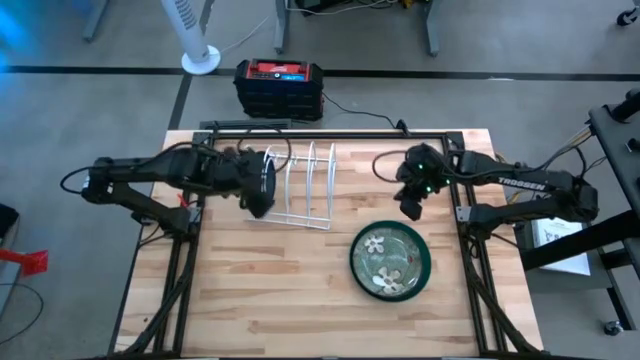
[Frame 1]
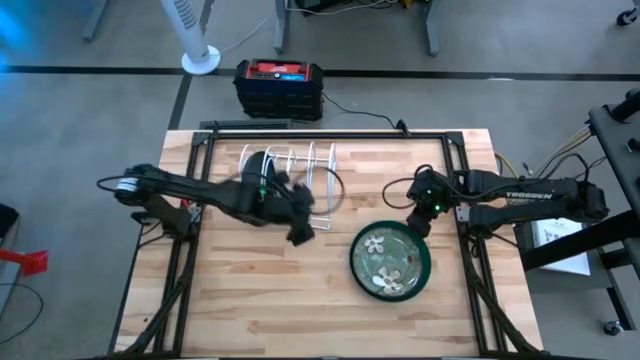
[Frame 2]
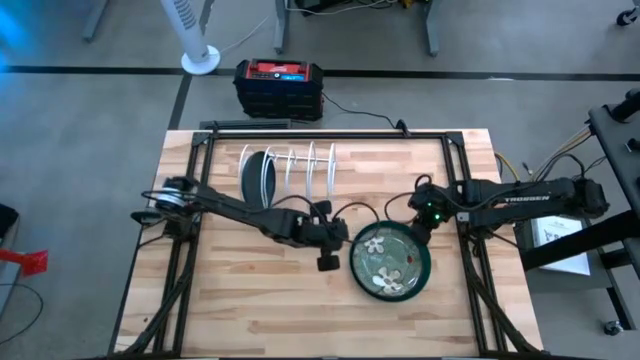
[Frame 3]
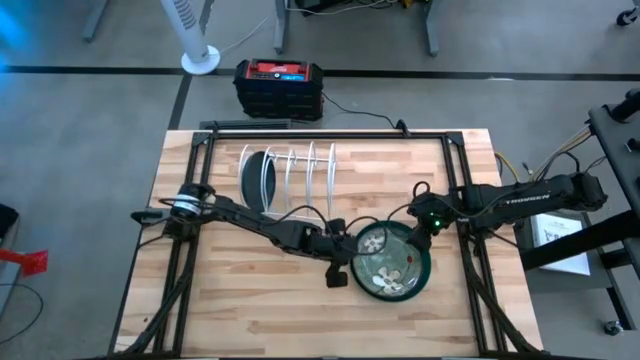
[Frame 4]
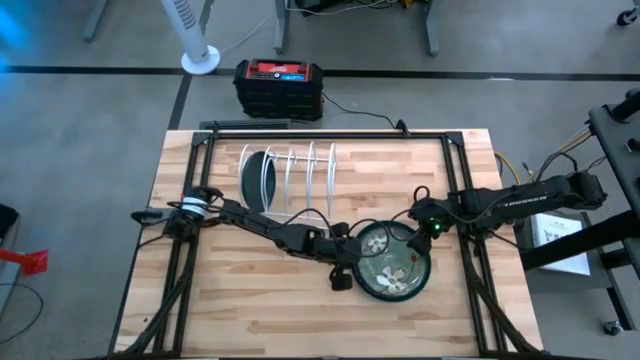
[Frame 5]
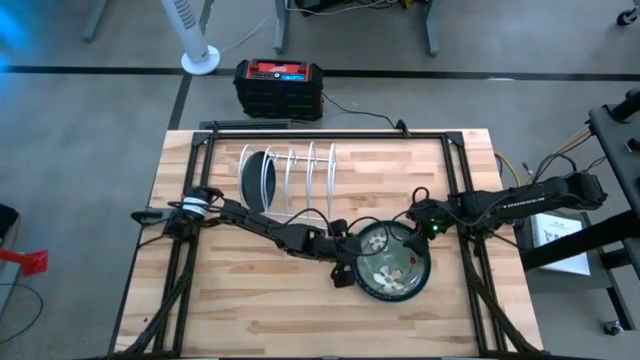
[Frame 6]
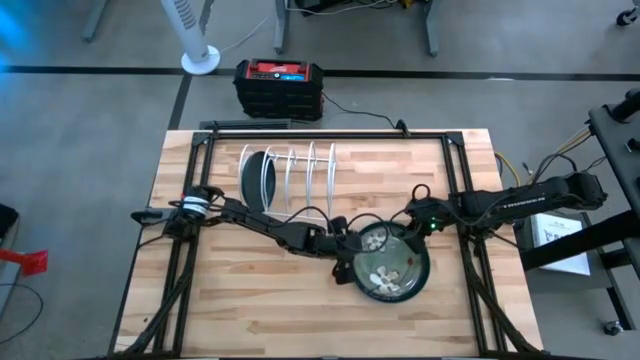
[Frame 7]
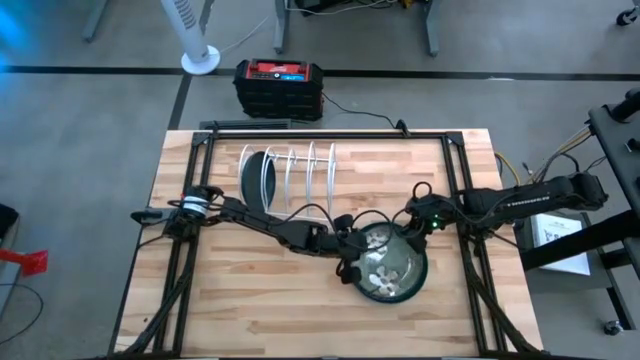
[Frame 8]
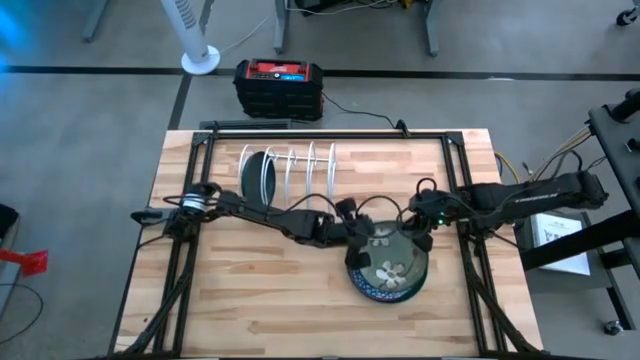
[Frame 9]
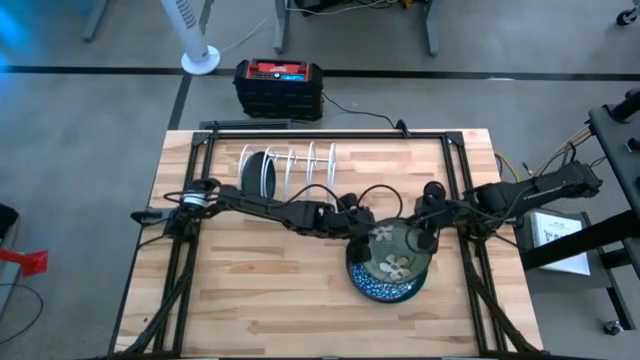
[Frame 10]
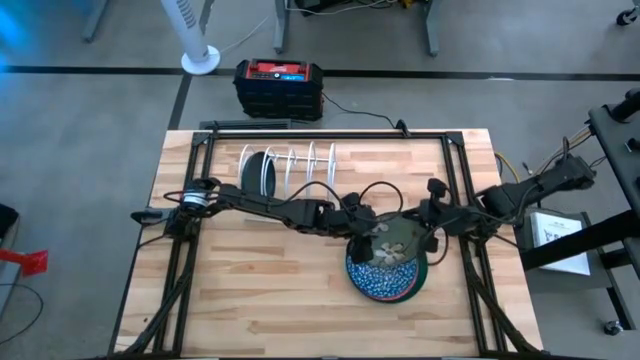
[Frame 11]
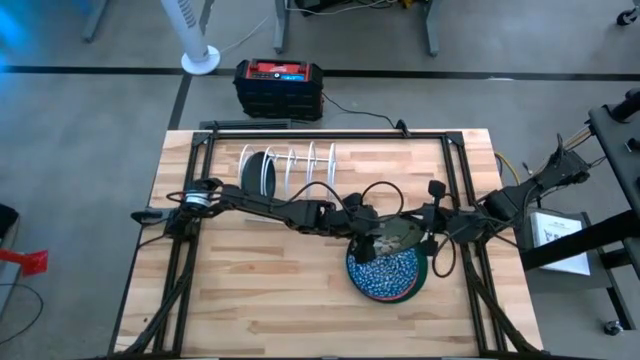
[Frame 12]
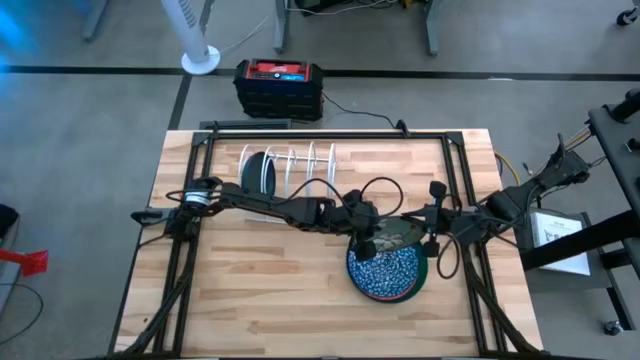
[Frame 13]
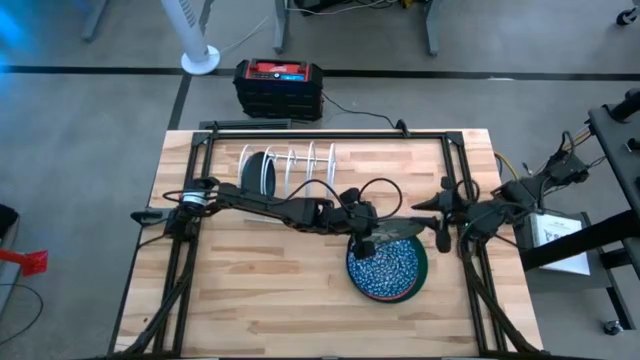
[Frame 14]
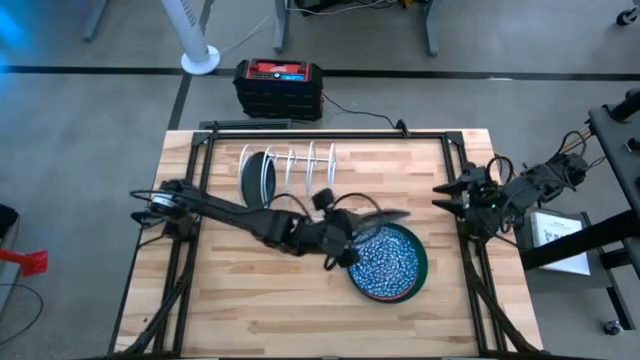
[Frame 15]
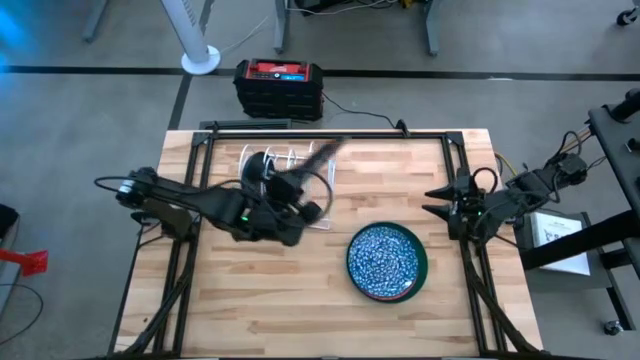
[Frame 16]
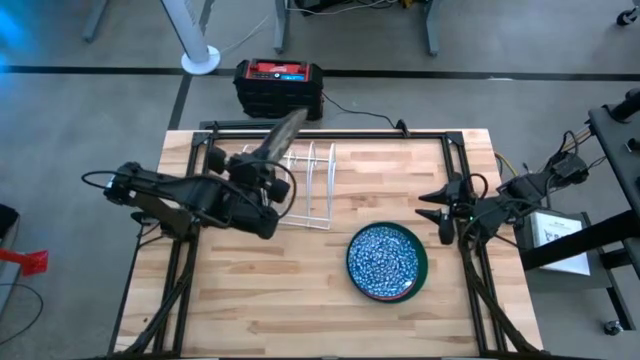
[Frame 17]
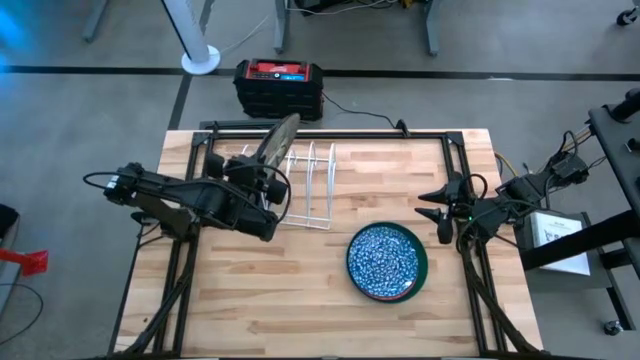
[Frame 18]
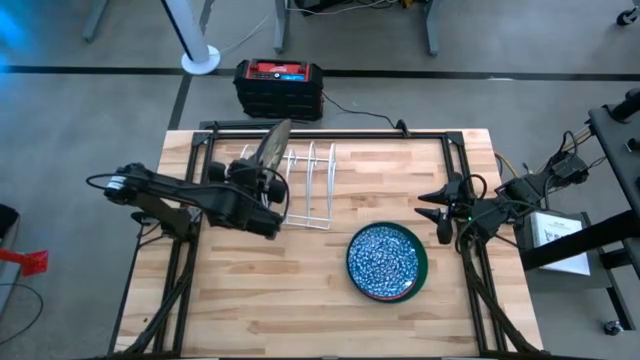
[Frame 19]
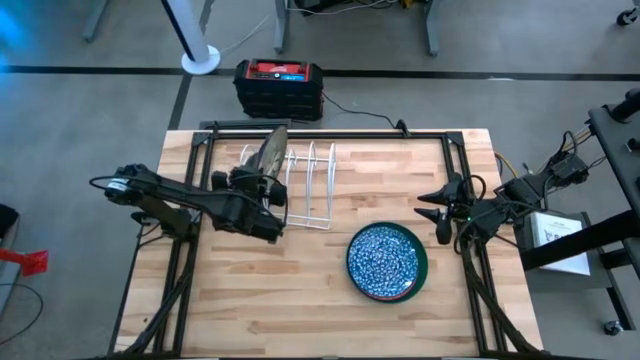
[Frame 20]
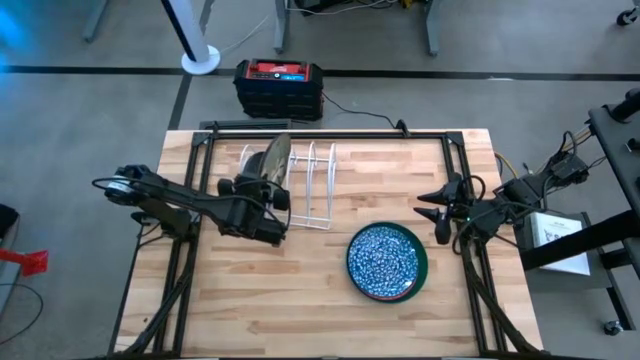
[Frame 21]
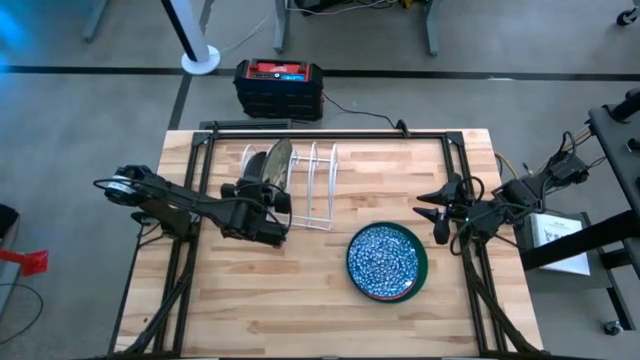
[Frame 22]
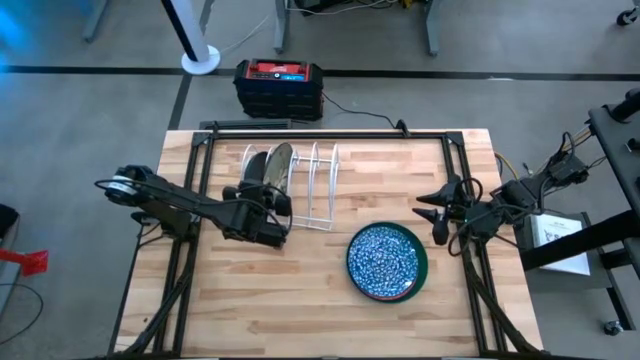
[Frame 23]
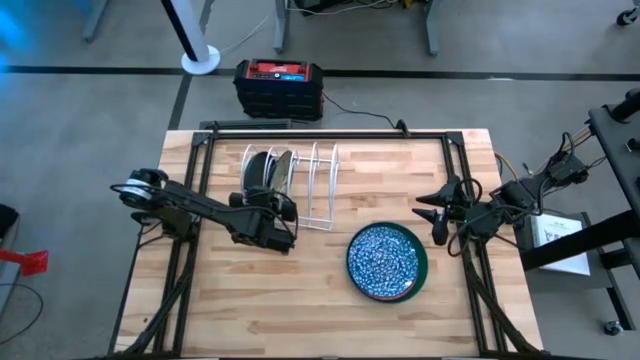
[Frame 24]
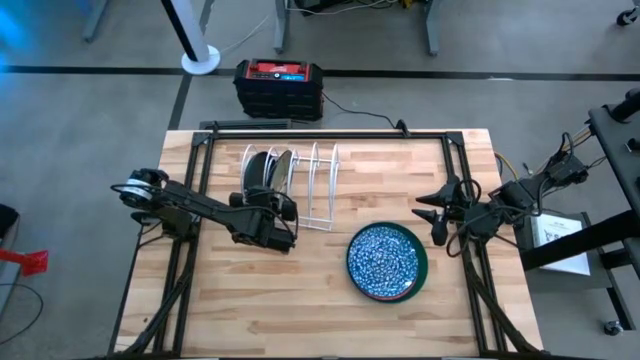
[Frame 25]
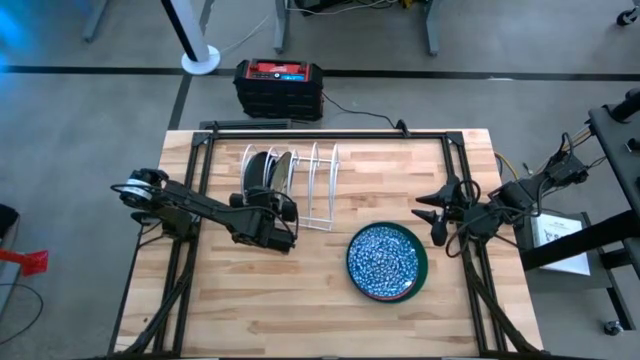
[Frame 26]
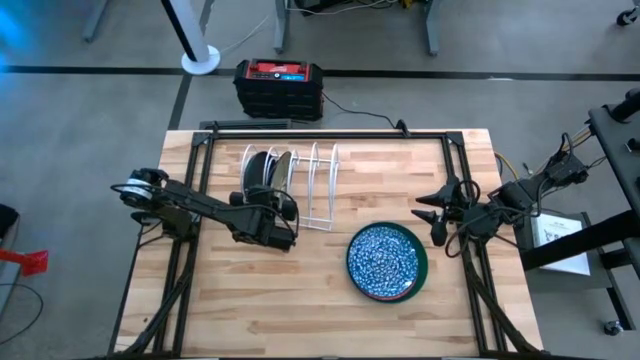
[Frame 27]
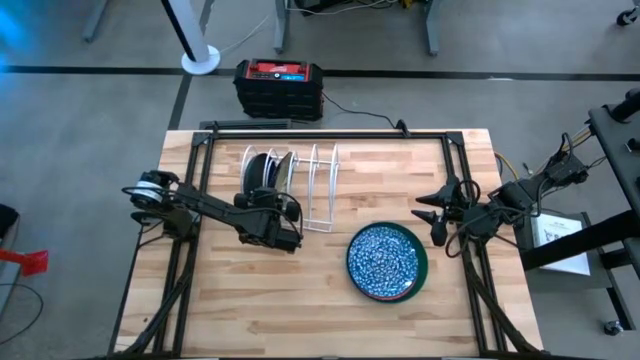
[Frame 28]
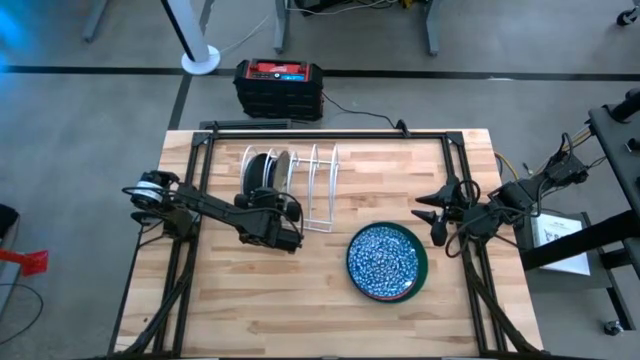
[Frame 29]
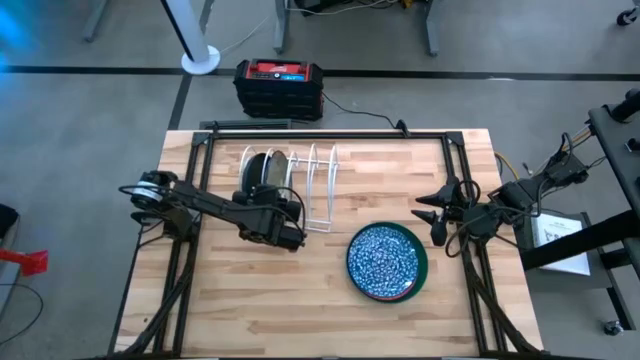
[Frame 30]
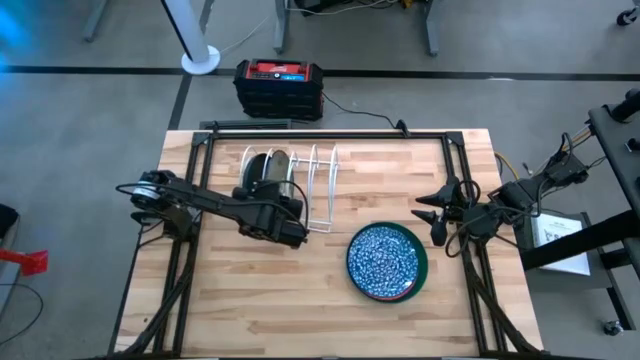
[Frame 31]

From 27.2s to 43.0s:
Task: Sort dishes
Put the green pattern plate into the white dish rack

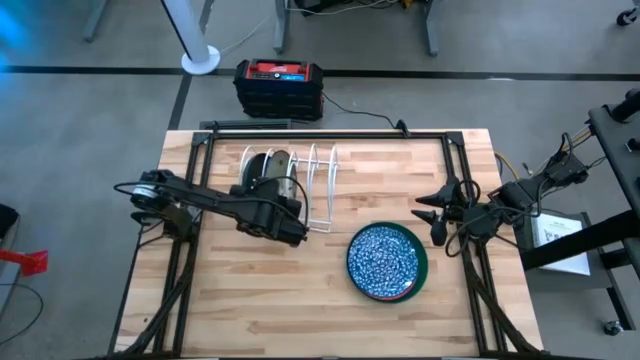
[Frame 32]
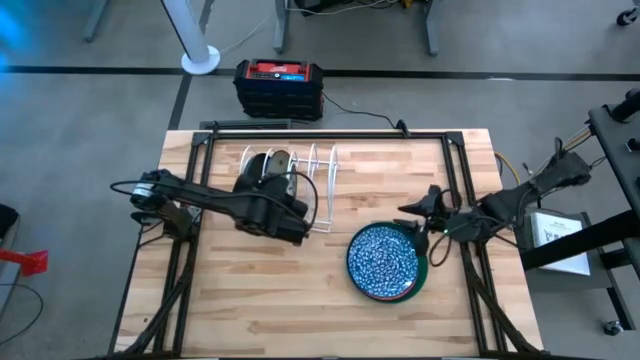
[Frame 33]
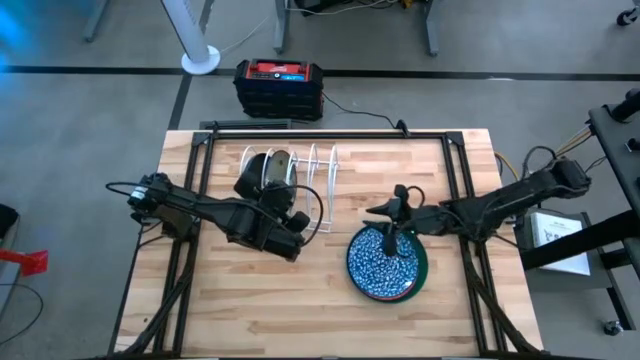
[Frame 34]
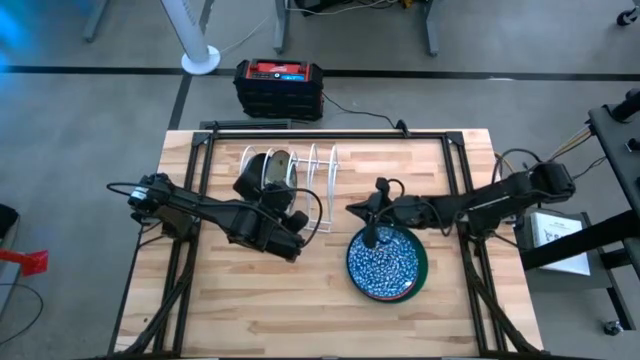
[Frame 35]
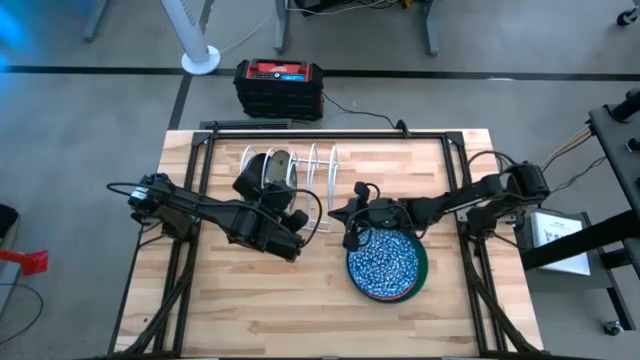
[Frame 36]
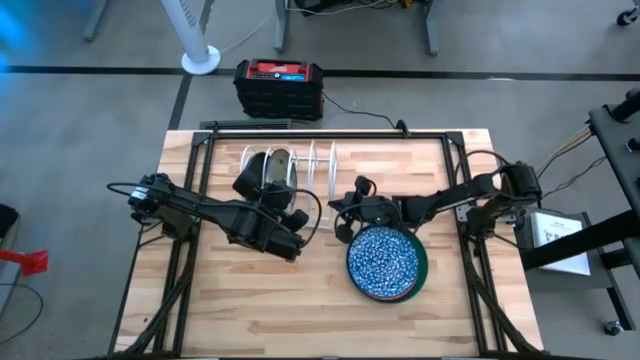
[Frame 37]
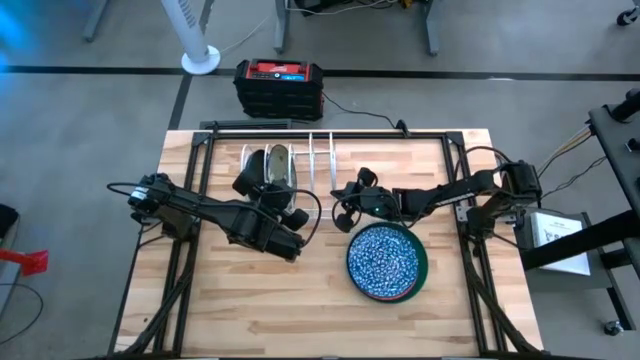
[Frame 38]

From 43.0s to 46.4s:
Adjust the white dish rack

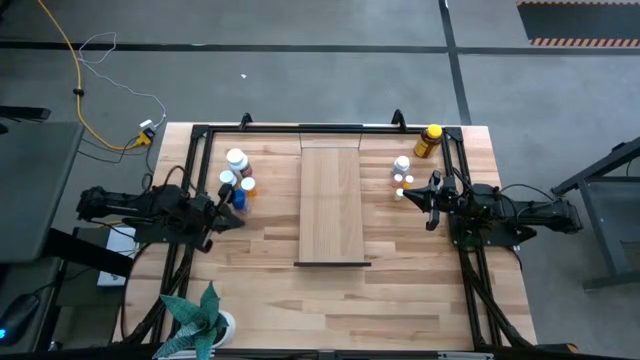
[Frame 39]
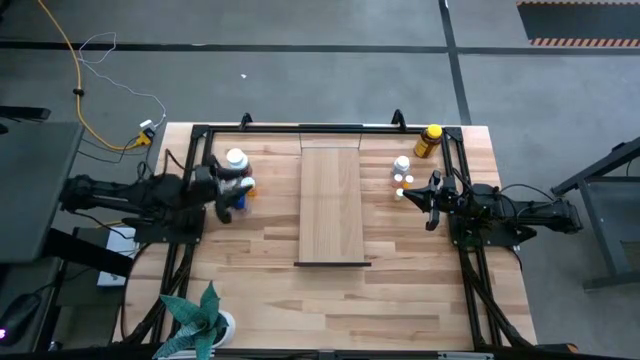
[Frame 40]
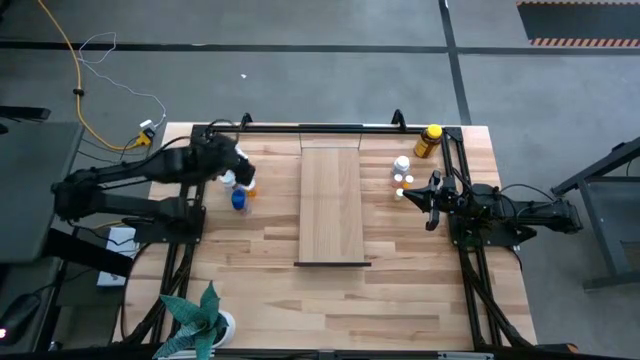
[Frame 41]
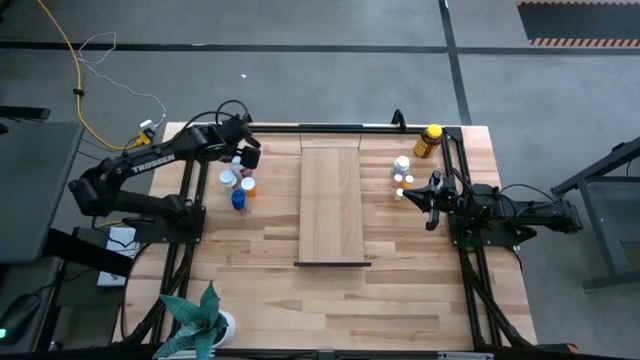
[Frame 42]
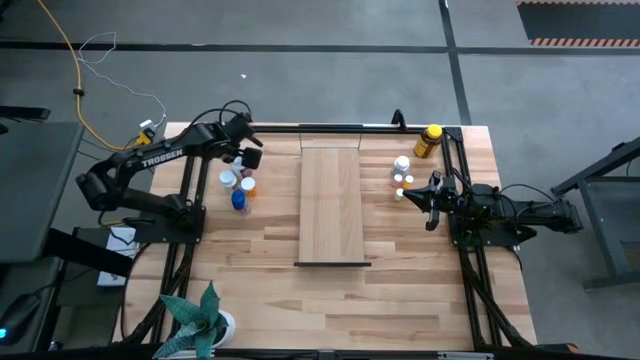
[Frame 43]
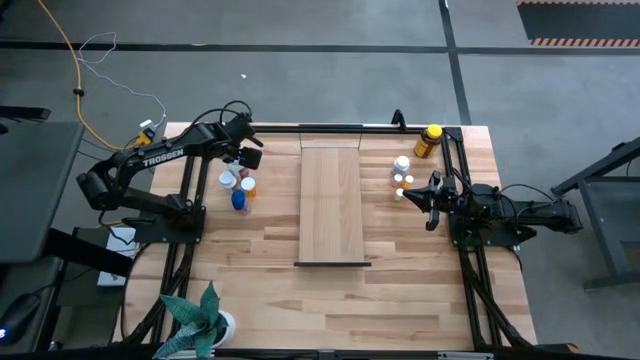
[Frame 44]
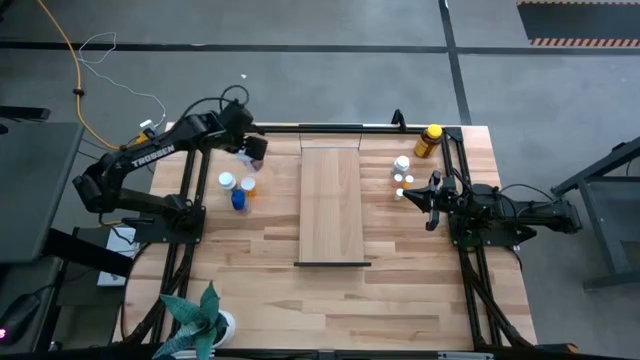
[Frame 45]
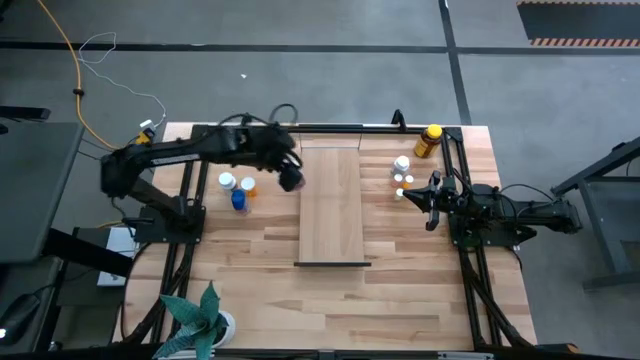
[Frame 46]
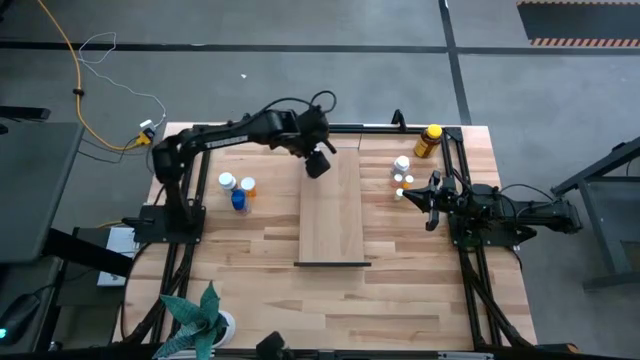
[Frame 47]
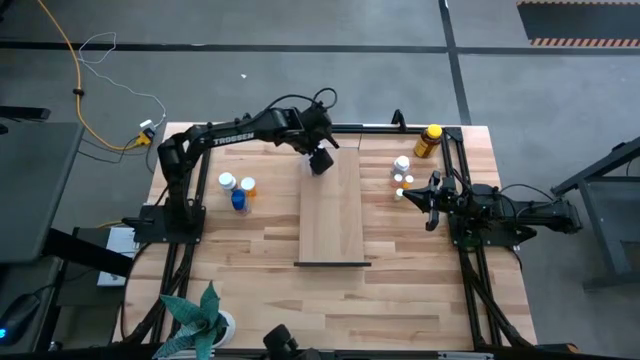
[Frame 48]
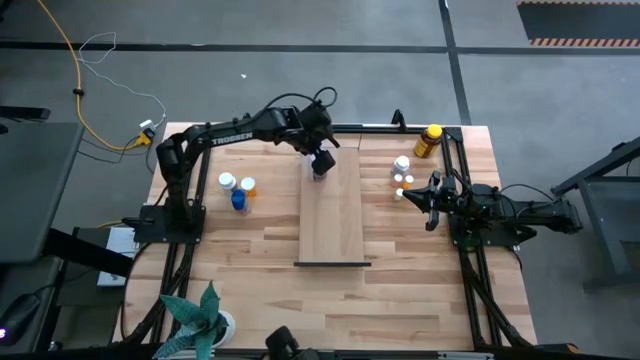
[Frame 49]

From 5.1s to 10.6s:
Task: Pick and place medicine bottles onto shelf by color
Put the purple pill bottle on the shelf
